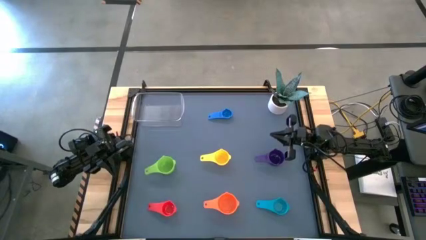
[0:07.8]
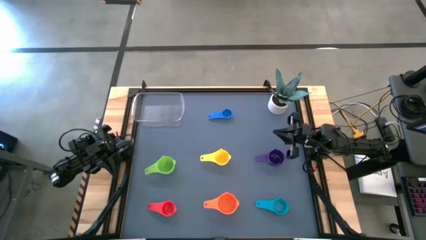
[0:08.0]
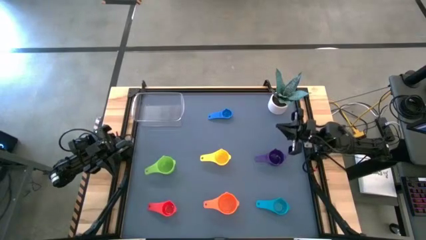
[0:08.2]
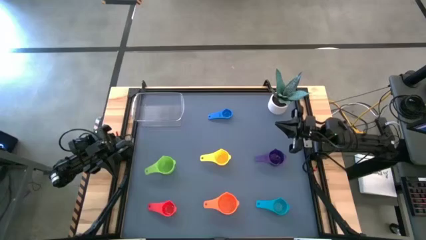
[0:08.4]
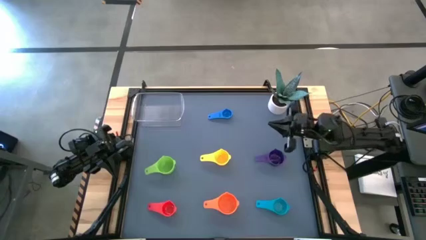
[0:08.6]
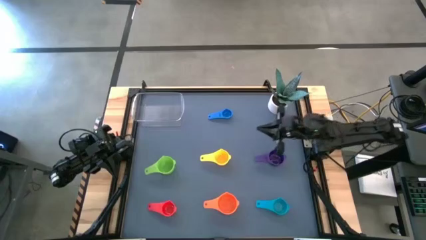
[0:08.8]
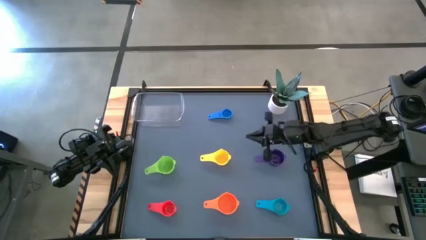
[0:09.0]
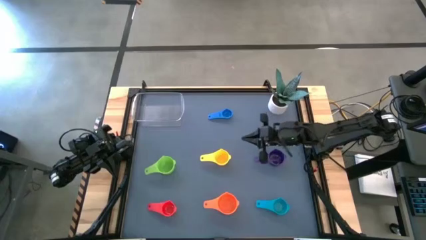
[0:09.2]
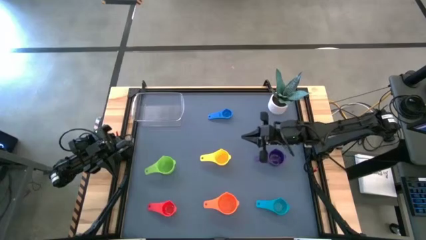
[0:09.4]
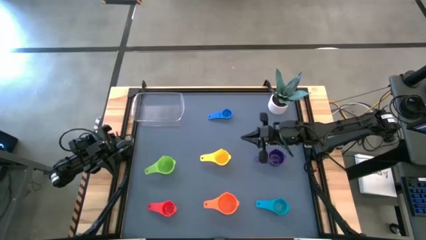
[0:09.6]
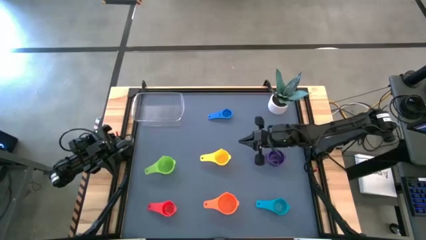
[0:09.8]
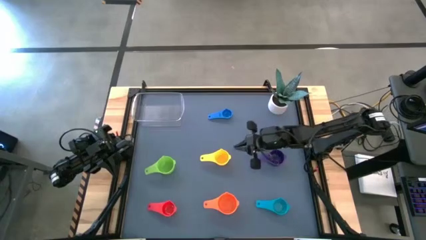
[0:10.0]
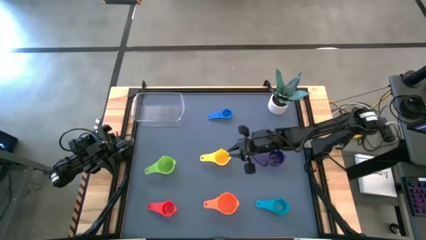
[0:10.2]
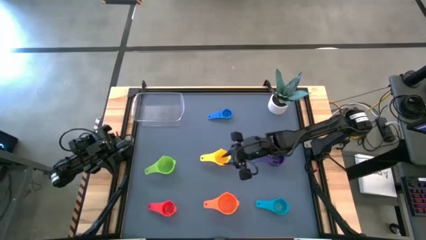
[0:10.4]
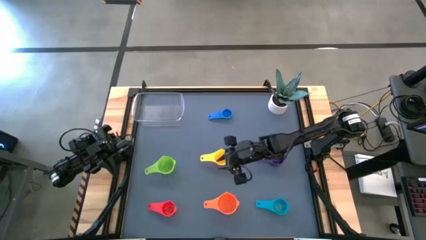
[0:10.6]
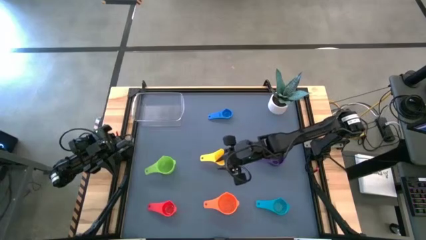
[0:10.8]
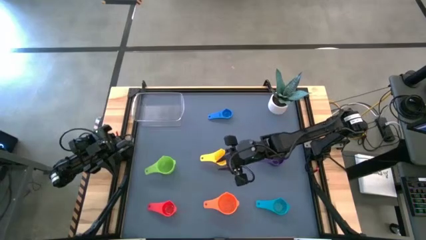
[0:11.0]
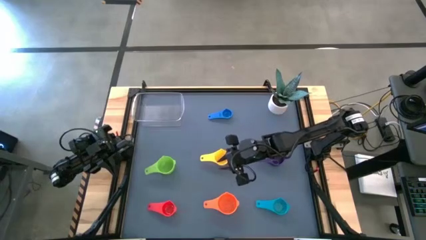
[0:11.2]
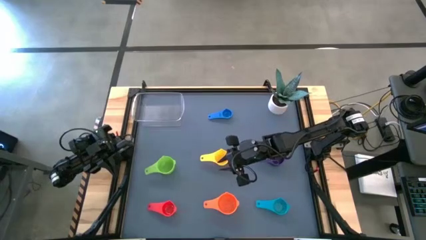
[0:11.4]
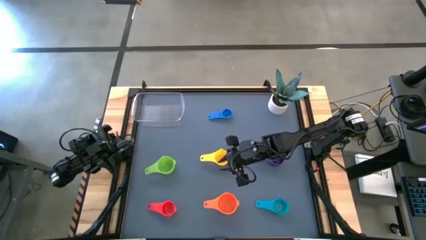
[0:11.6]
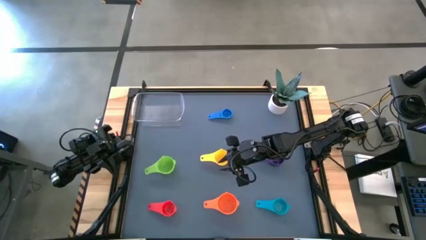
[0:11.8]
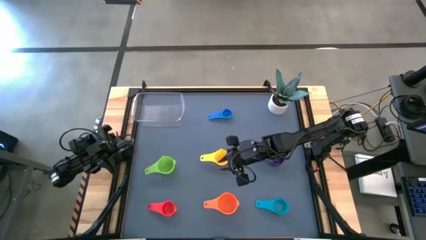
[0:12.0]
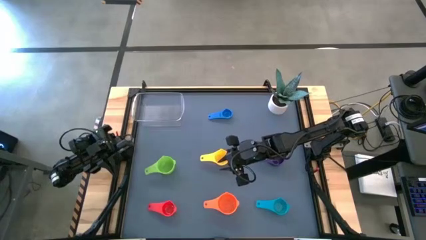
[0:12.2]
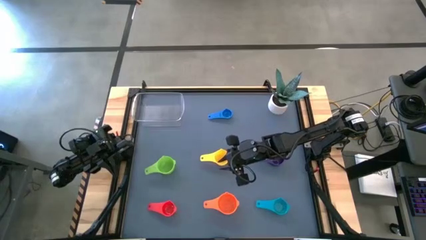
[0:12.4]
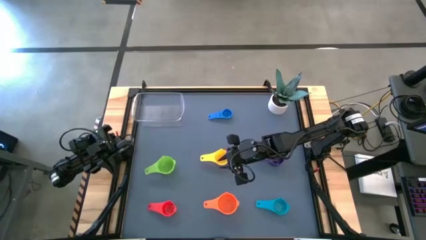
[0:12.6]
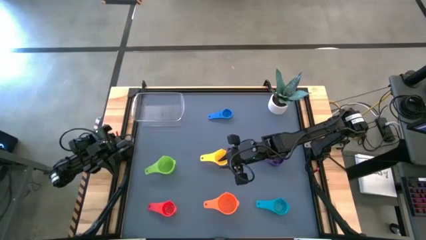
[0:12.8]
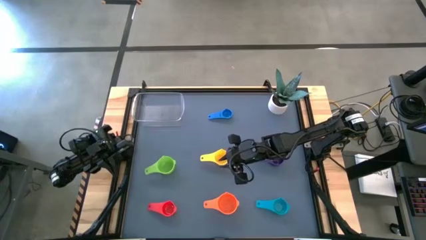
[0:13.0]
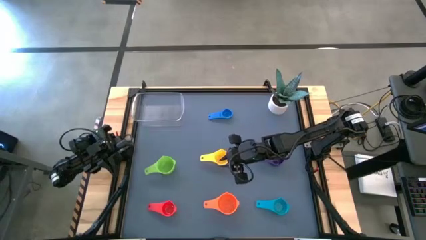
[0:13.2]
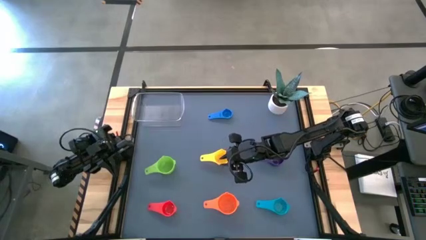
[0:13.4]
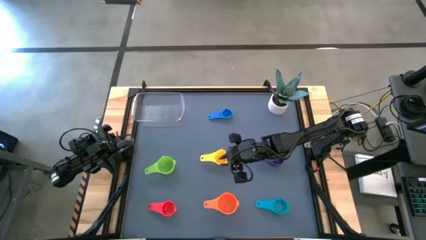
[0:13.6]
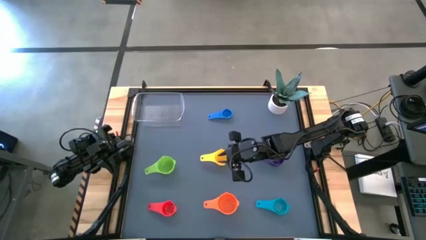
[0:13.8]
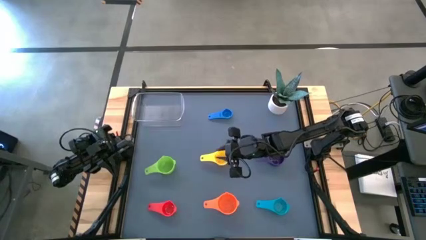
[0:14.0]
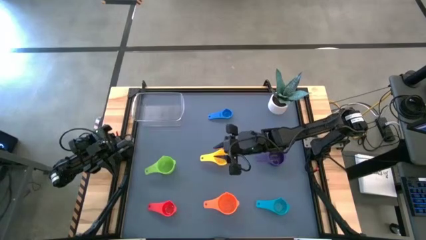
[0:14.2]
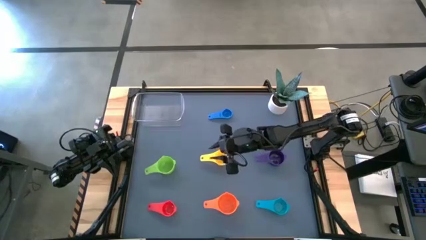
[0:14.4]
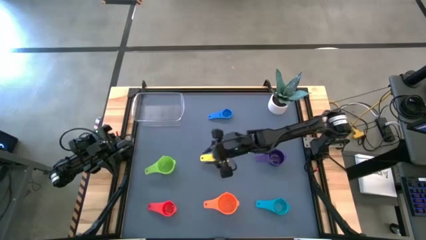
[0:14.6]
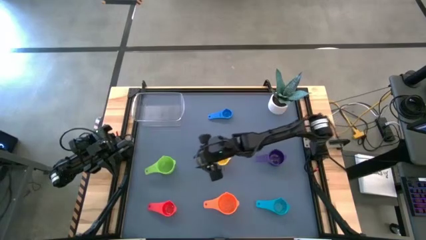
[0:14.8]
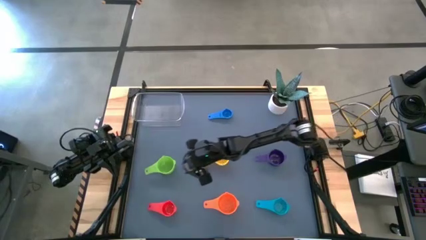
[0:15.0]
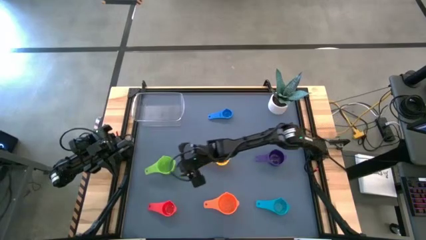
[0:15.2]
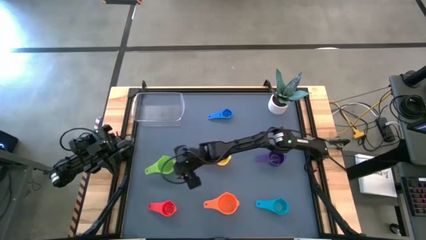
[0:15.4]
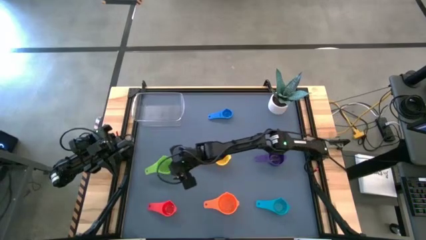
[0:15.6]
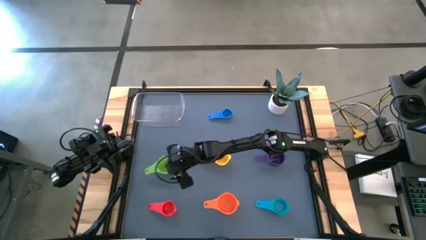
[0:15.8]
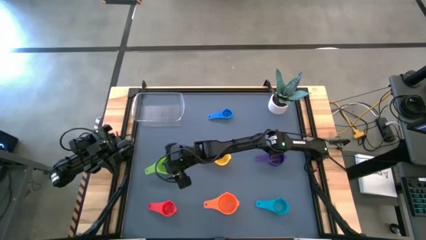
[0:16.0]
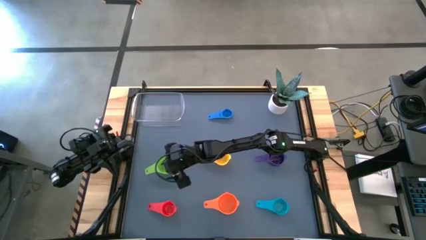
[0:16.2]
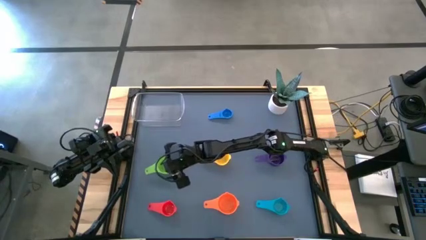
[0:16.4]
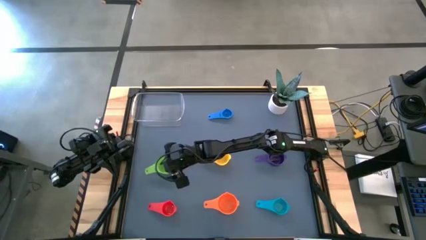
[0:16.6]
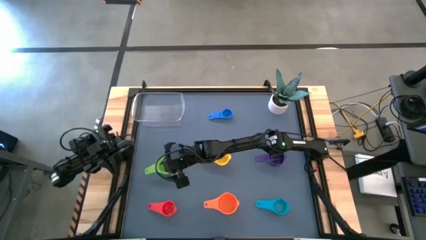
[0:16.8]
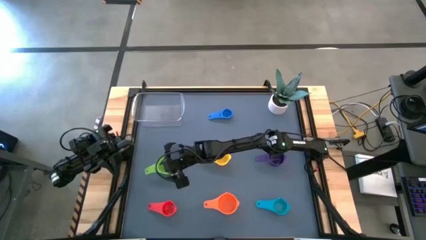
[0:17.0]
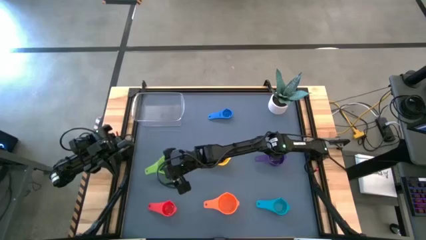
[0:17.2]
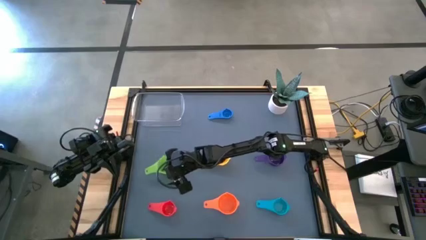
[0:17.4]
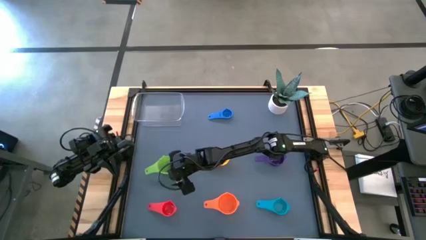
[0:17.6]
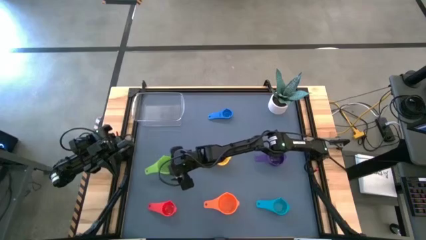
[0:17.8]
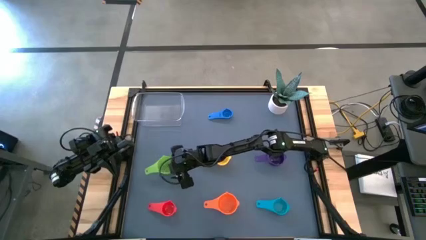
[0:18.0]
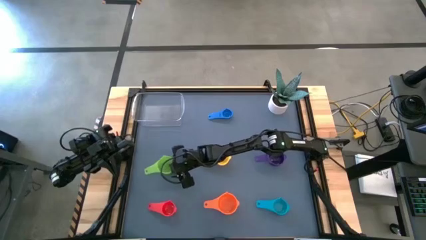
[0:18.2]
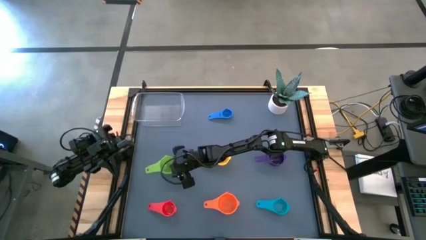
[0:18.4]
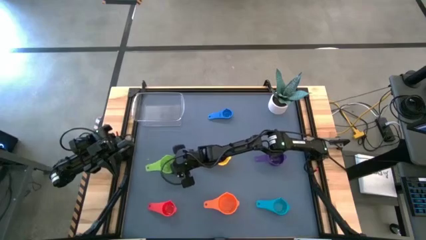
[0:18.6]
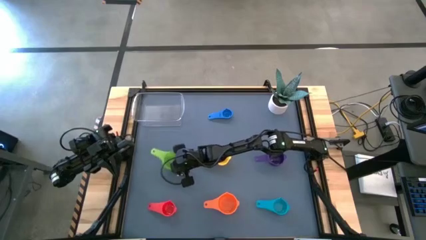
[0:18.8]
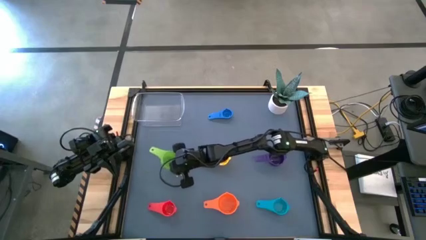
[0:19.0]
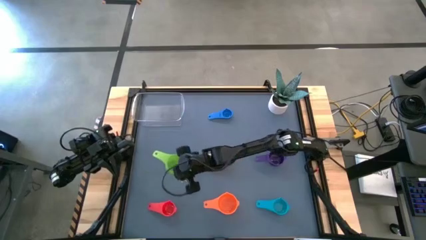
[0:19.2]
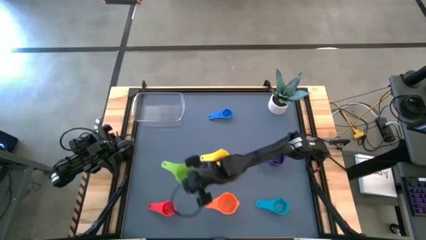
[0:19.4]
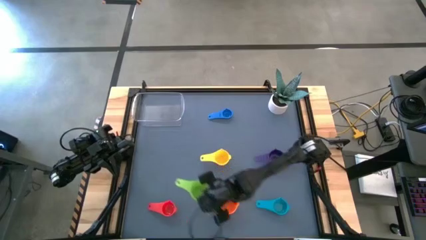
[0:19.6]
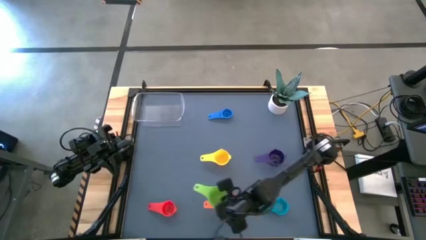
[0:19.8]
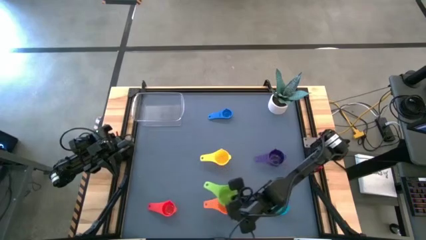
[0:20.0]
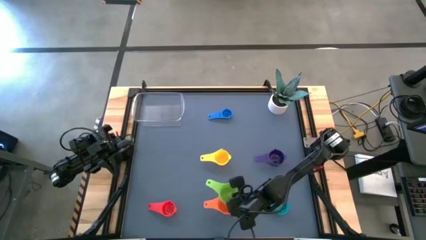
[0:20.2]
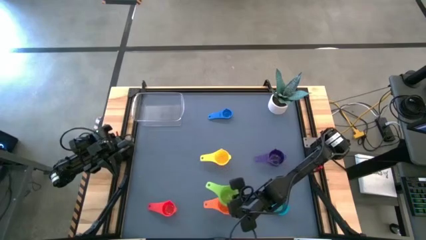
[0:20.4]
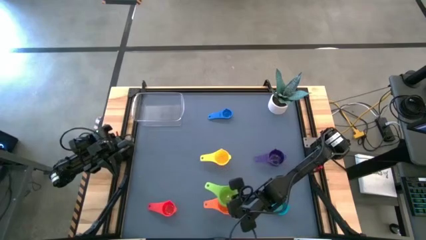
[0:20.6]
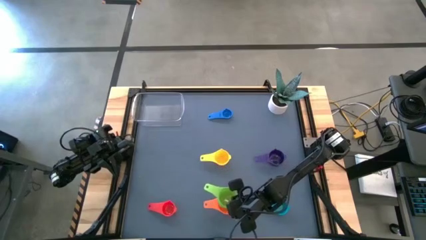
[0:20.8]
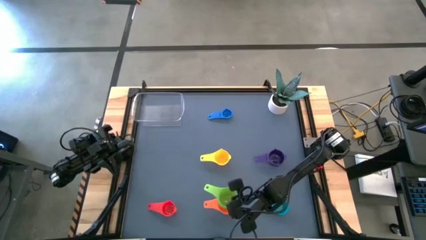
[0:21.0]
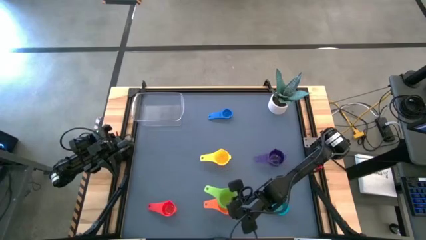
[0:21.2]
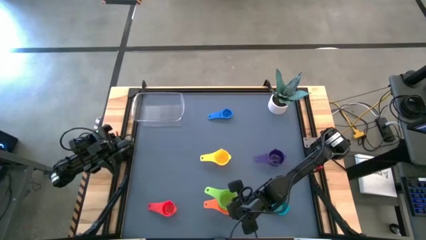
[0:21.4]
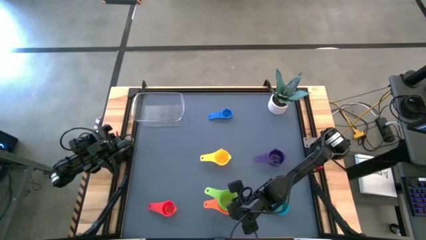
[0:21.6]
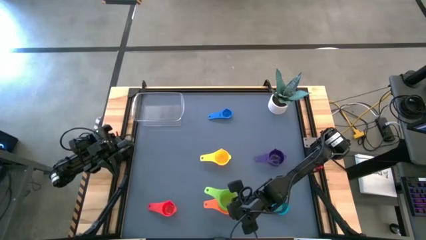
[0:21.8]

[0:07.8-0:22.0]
Task: Nest measuring cups in basket
Stack the green measuring cup on top of the orange measuring cup
